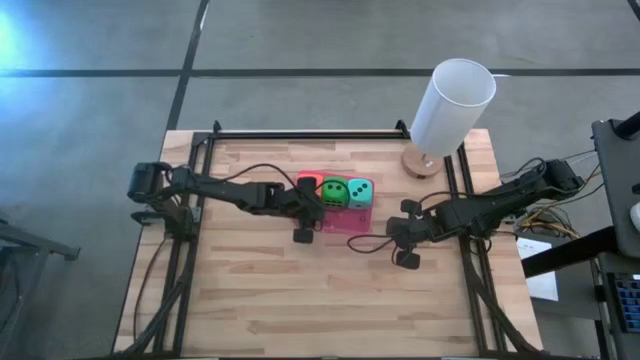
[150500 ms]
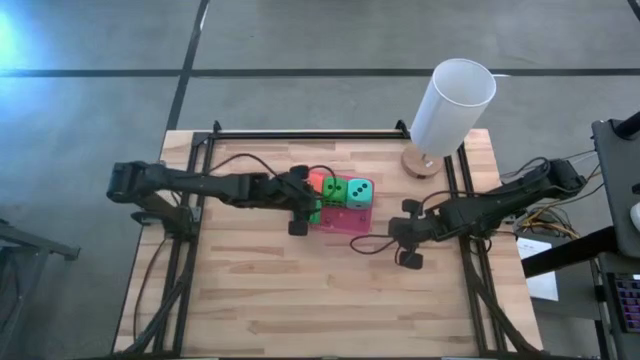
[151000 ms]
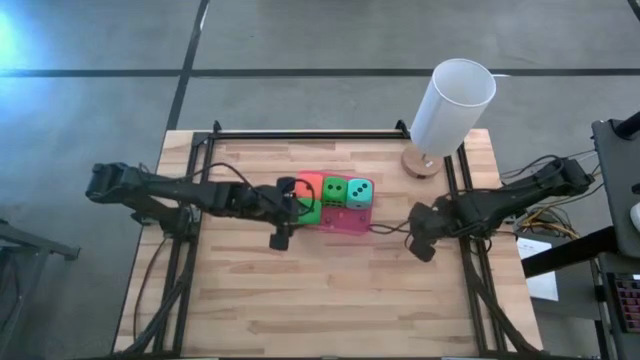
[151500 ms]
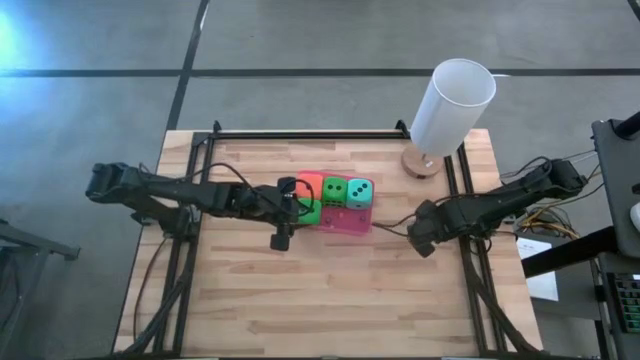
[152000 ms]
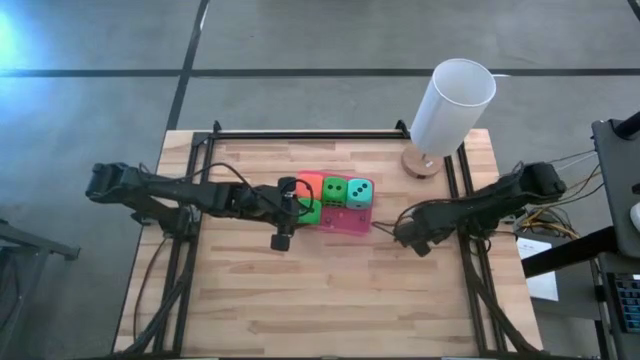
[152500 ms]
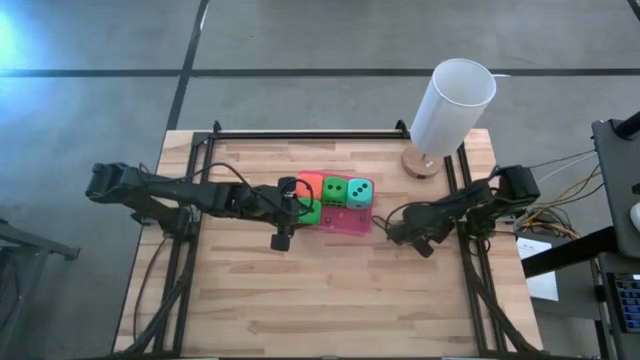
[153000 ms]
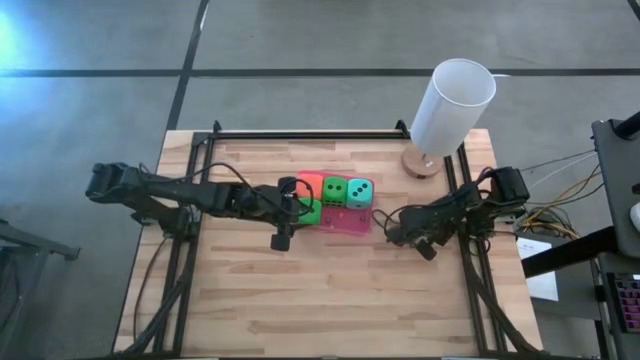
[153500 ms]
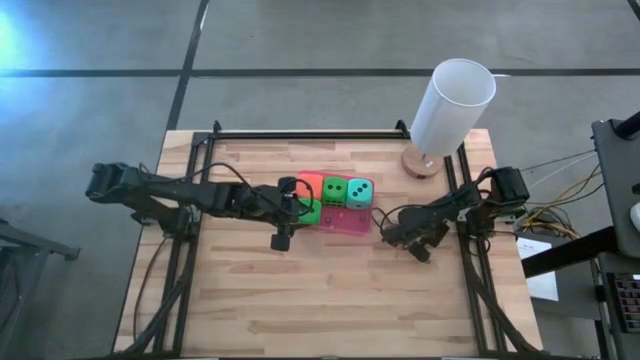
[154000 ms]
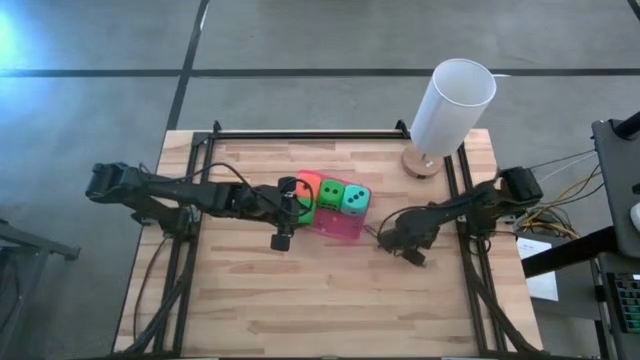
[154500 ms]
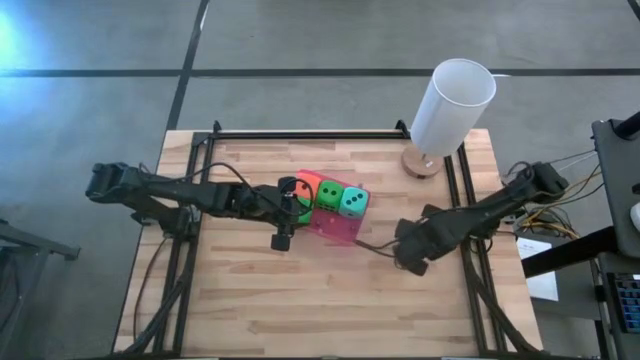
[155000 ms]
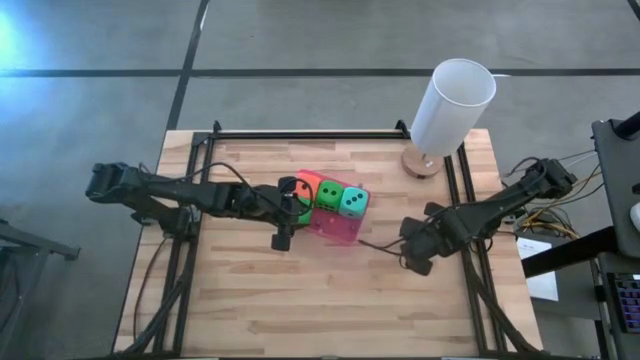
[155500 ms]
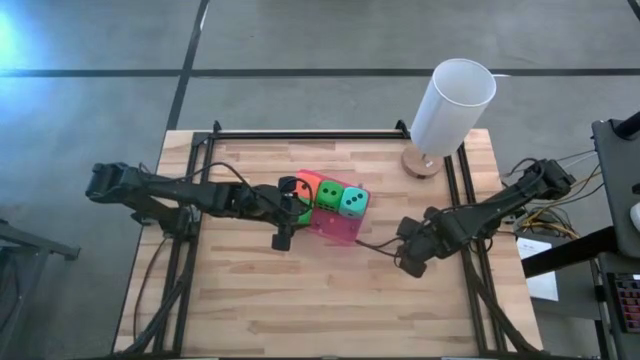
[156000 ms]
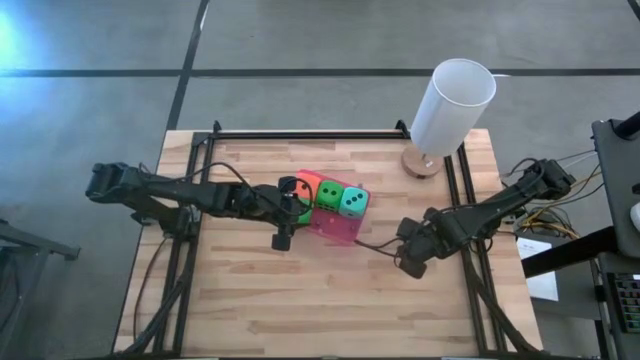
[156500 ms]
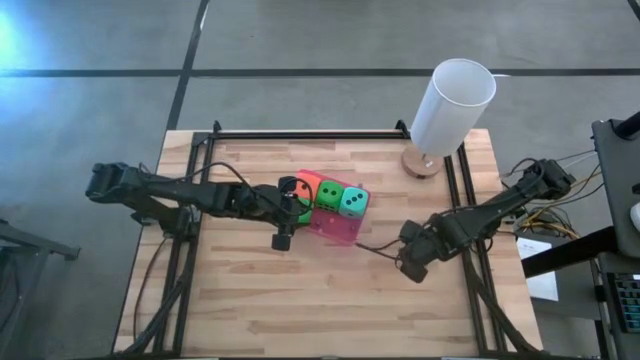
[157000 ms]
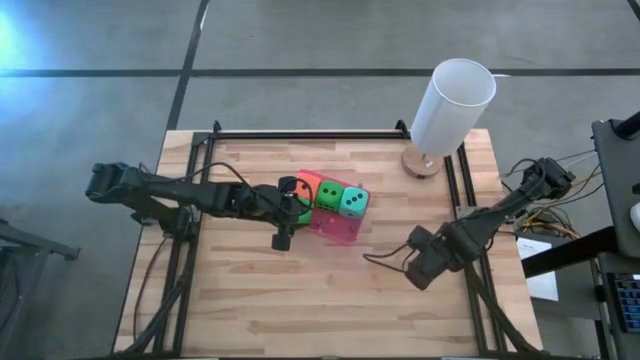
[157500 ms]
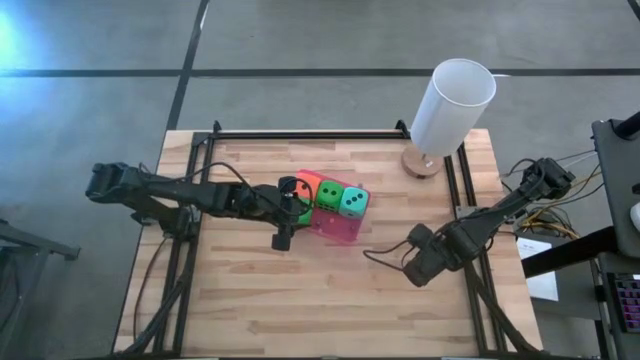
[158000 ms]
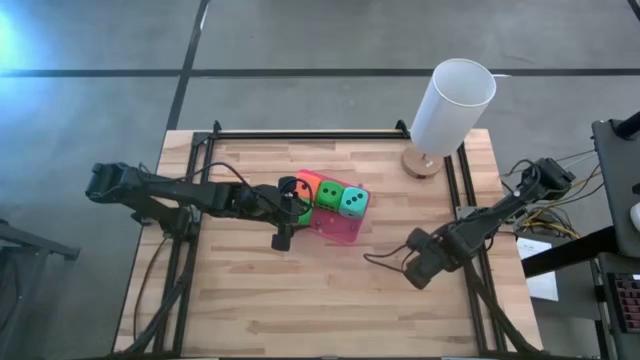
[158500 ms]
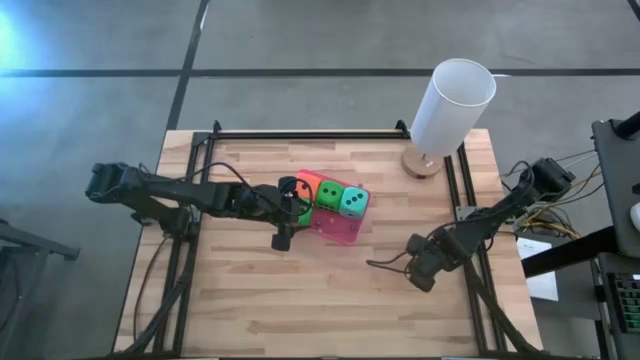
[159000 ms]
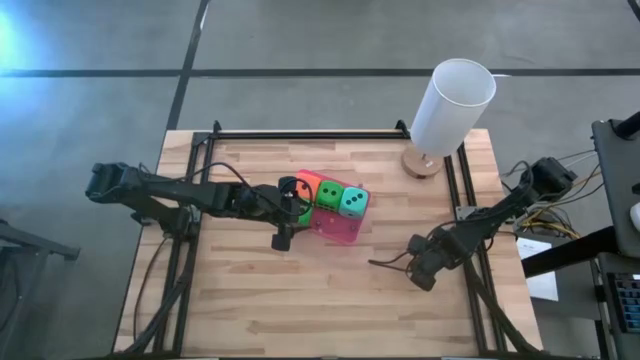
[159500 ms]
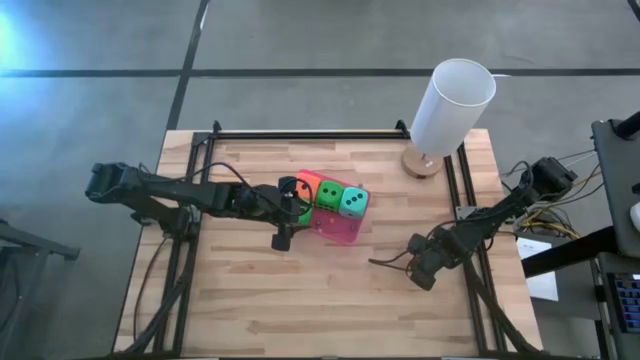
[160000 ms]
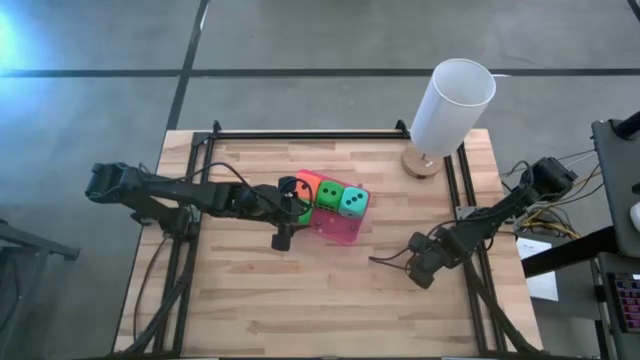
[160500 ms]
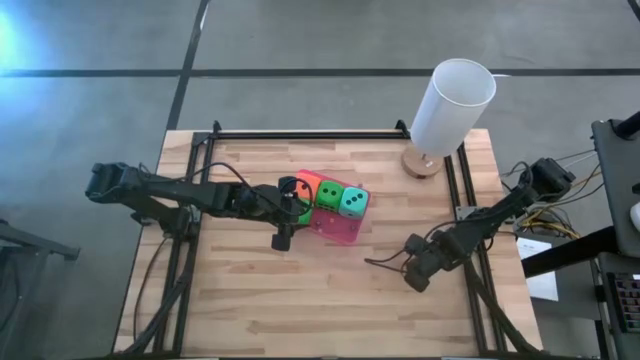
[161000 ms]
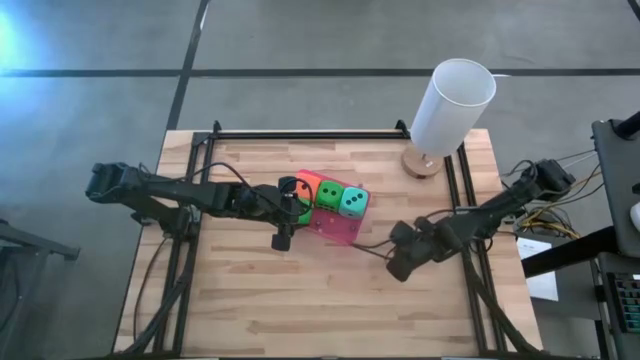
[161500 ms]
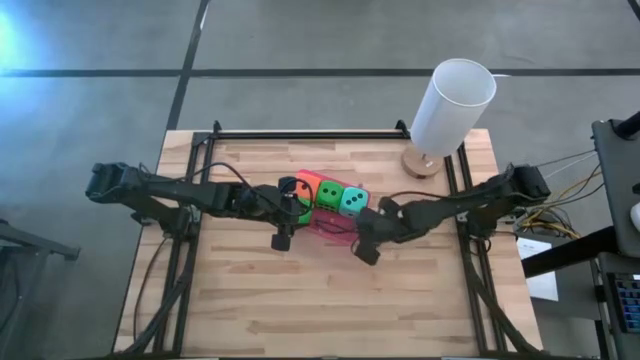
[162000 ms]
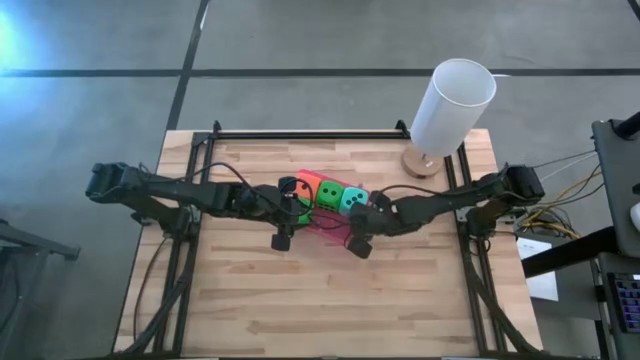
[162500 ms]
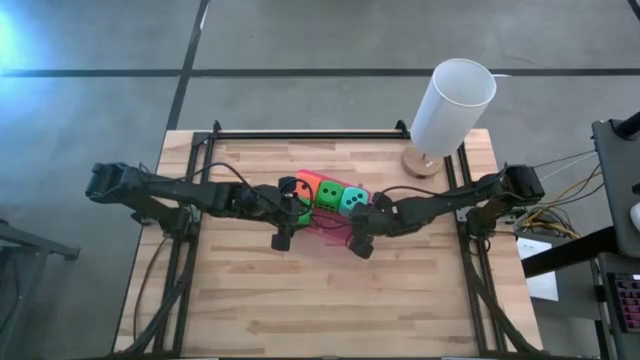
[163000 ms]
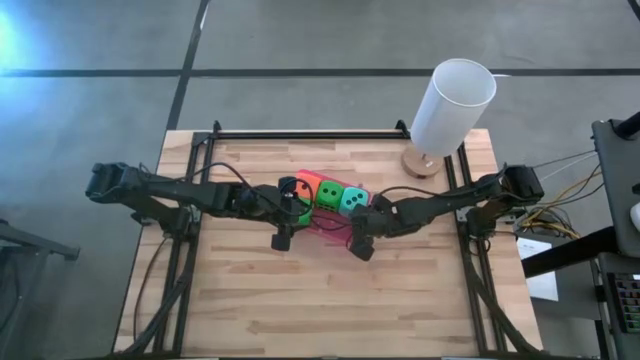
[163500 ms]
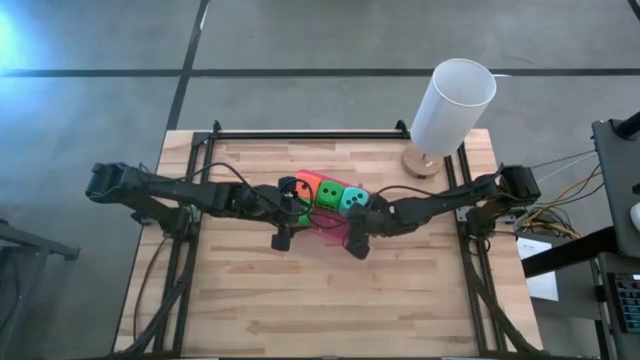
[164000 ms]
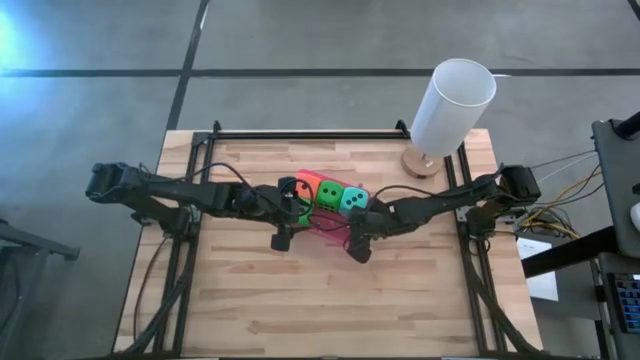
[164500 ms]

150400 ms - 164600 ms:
Task: Pick & Place Dice
Put the small blue die into the pink bin

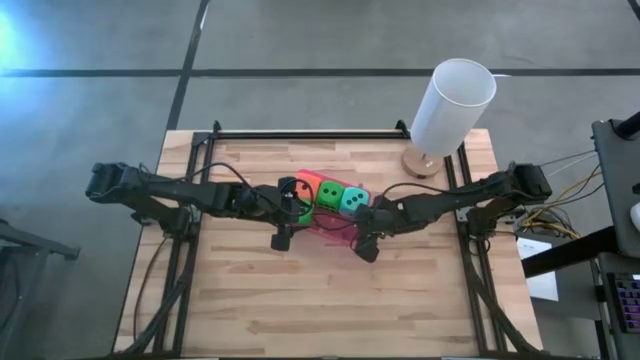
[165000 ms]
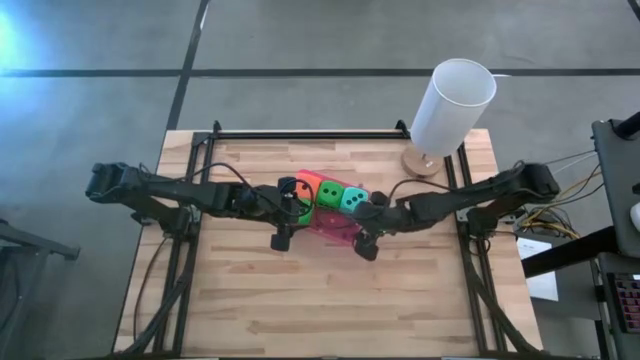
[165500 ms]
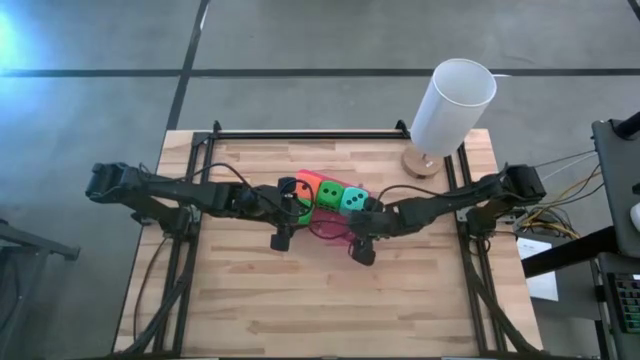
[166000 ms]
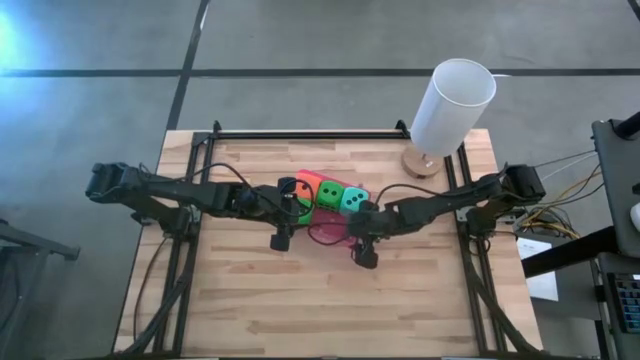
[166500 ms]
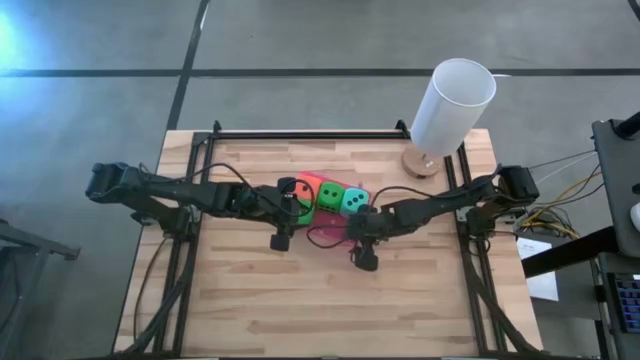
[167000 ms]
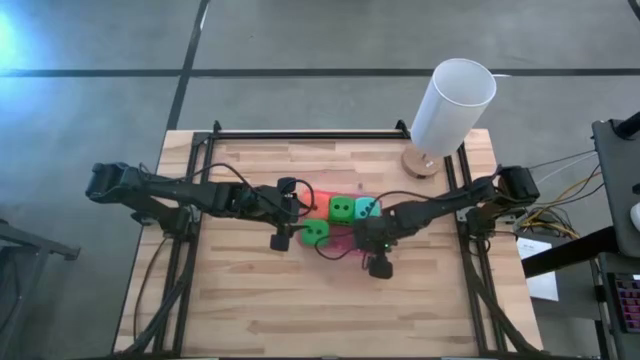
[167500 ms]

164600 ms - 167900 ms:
Adjust the pink bin

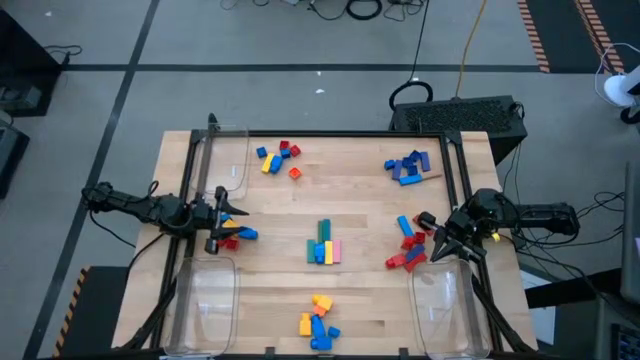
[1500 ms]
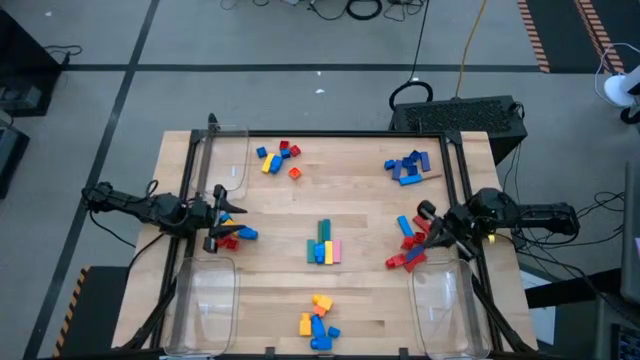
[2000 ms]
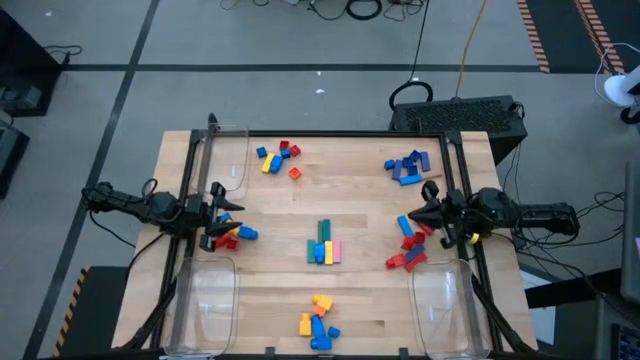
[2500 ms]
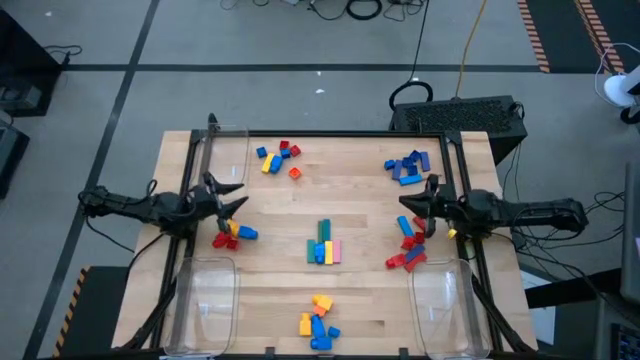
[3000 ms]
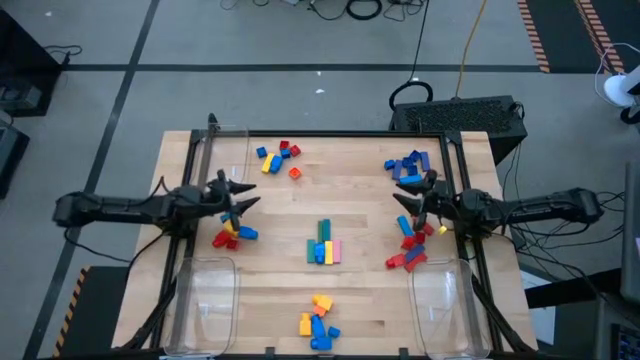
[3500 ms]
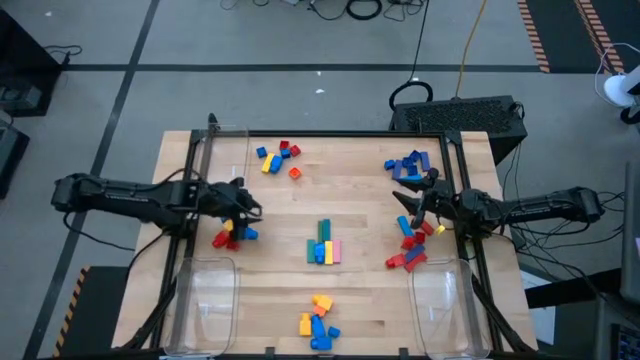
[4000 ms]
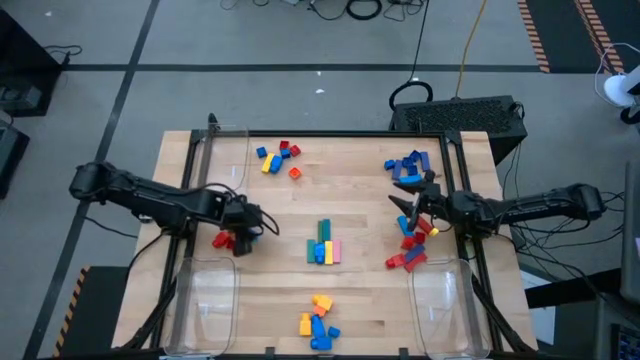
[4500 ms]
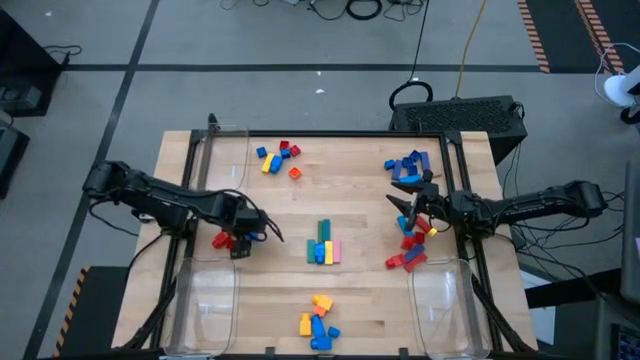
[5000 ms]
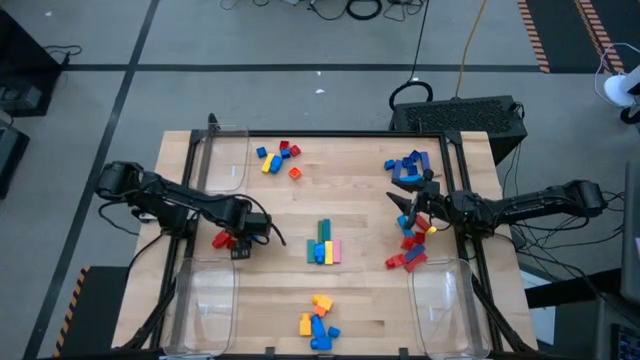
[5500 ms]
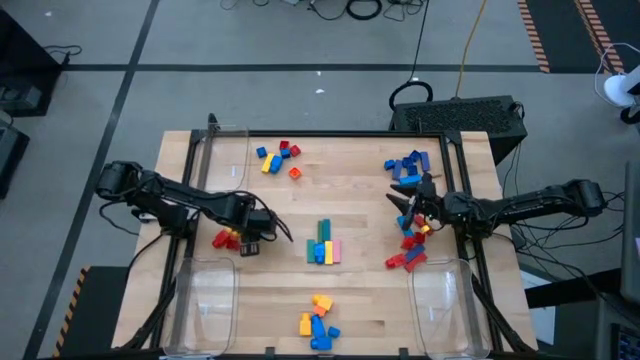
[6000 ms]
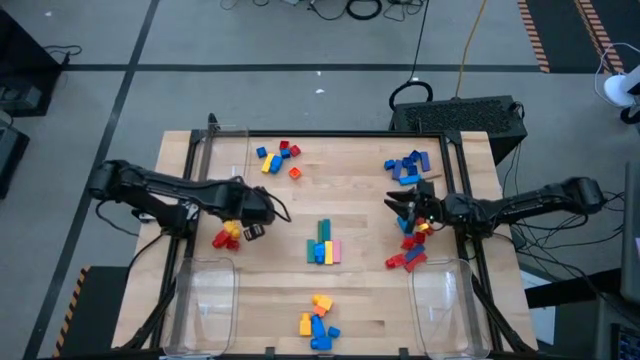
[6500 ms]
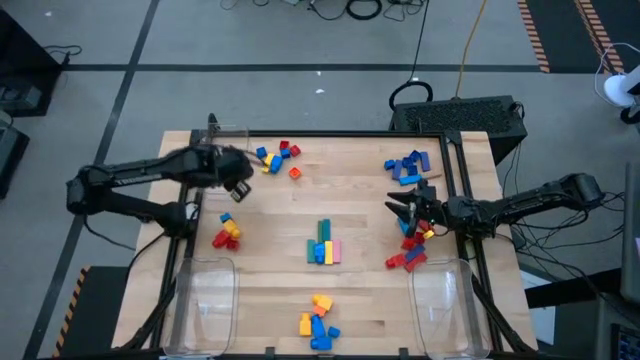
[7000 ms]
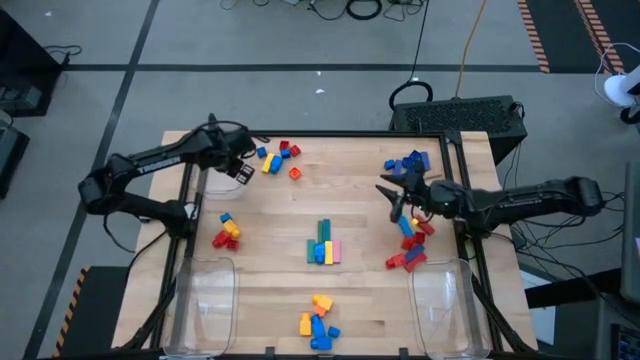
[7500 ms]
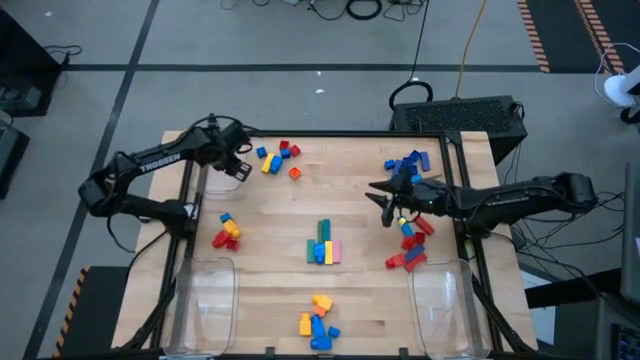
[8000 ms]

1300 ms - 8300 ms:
Task: Sort blocks by size
Put the blue one stud game piece into the top left transparent bin
